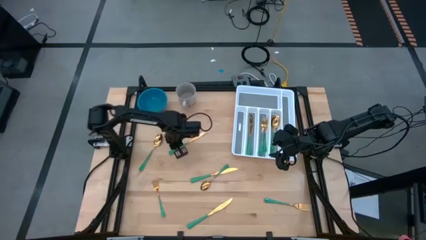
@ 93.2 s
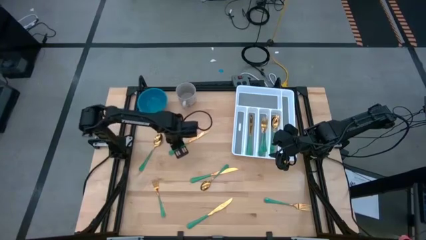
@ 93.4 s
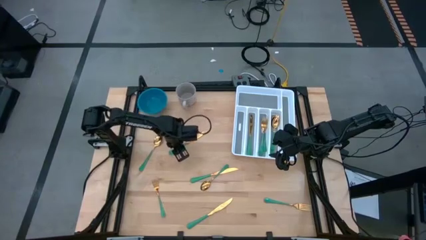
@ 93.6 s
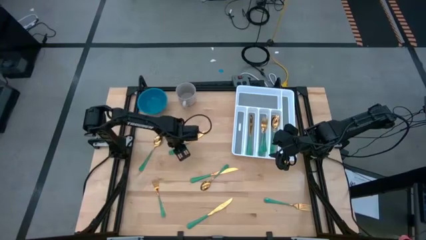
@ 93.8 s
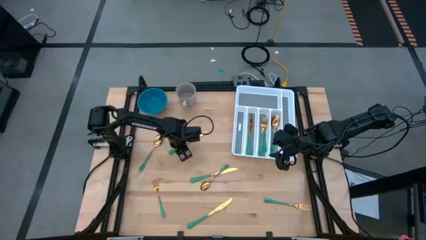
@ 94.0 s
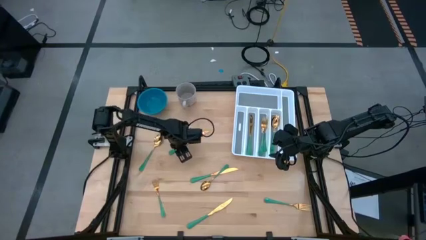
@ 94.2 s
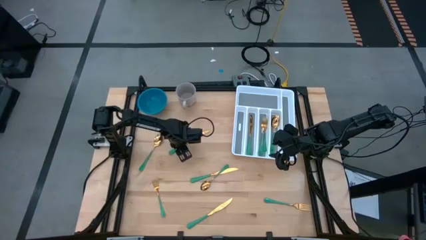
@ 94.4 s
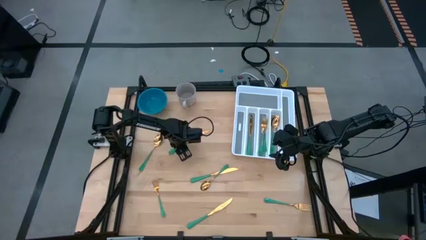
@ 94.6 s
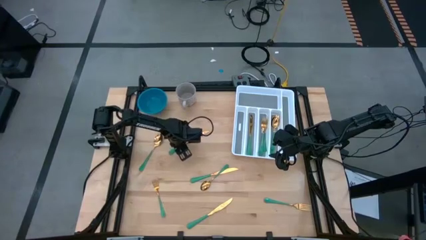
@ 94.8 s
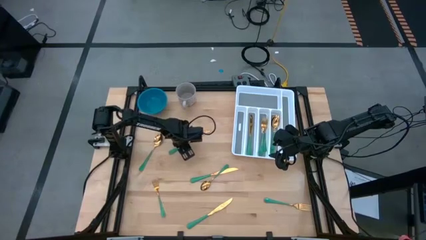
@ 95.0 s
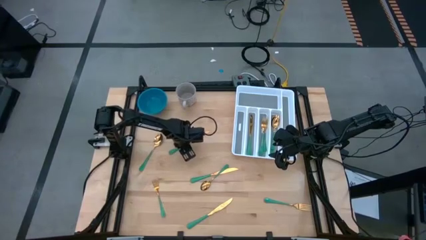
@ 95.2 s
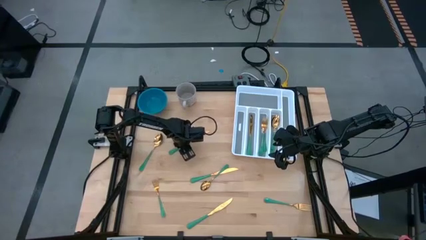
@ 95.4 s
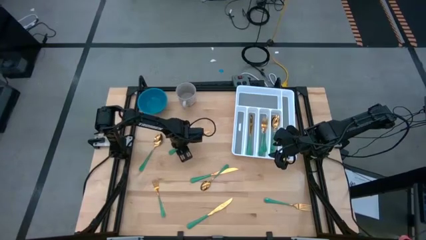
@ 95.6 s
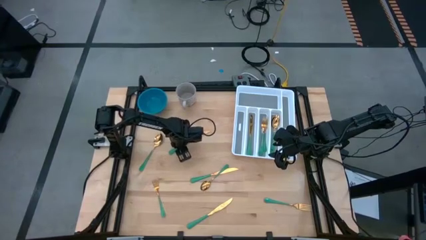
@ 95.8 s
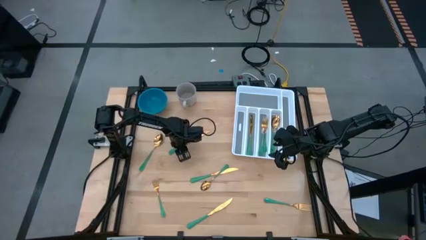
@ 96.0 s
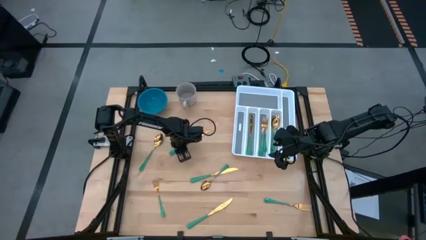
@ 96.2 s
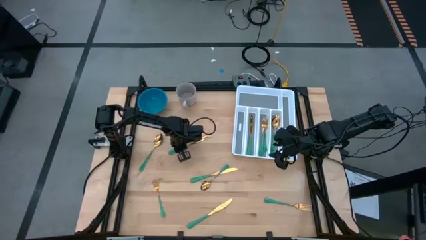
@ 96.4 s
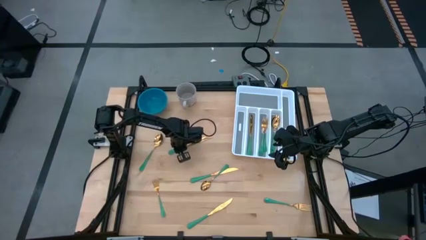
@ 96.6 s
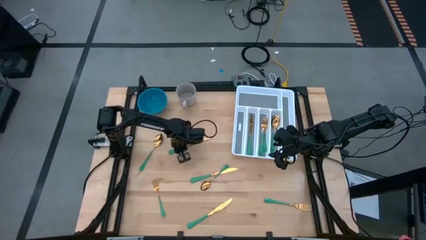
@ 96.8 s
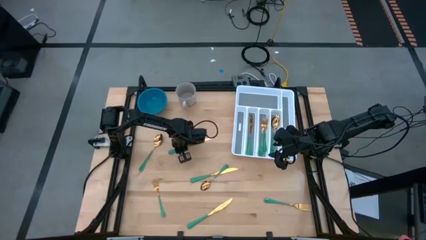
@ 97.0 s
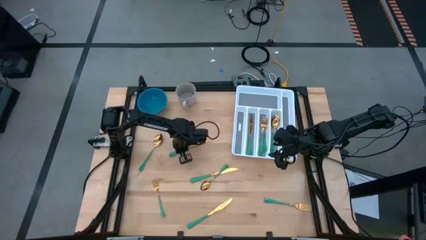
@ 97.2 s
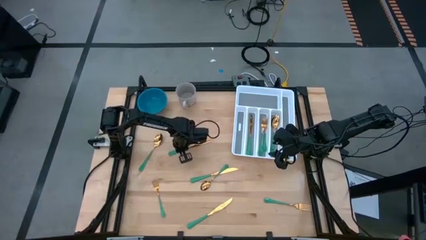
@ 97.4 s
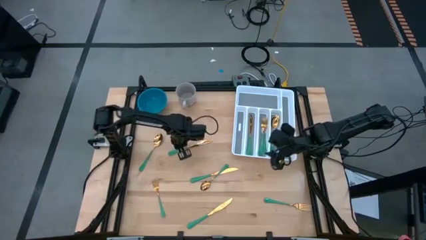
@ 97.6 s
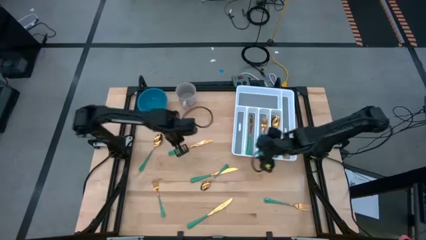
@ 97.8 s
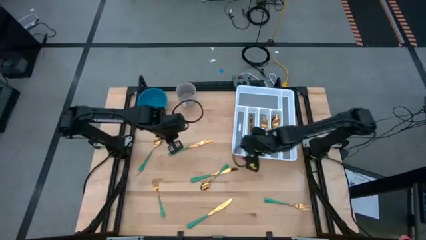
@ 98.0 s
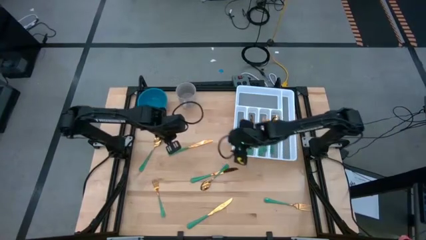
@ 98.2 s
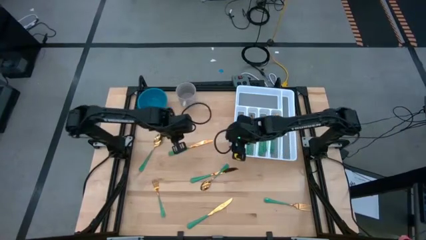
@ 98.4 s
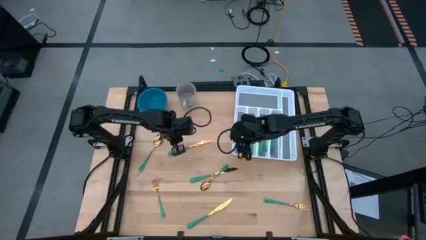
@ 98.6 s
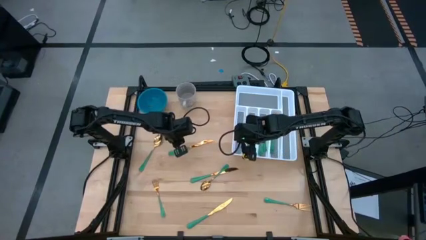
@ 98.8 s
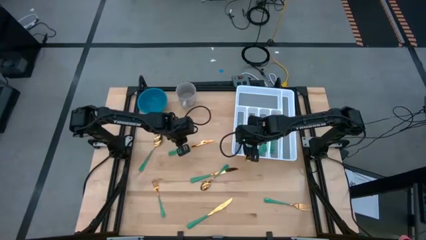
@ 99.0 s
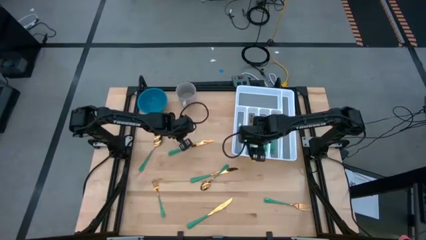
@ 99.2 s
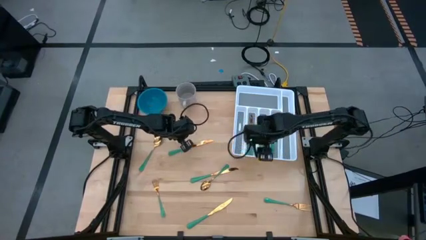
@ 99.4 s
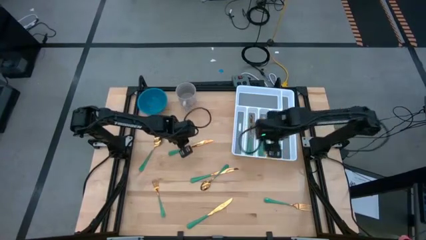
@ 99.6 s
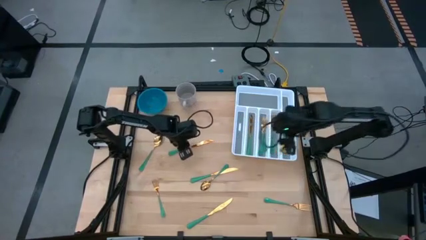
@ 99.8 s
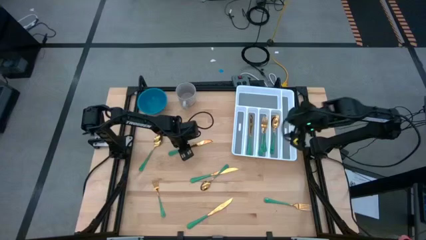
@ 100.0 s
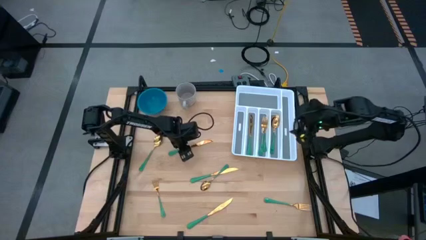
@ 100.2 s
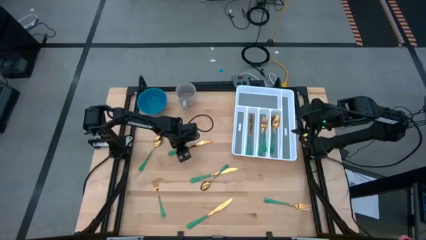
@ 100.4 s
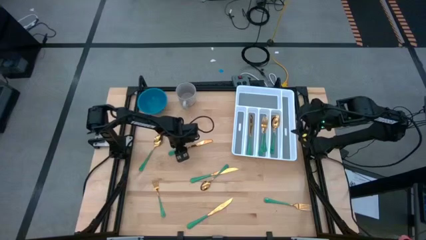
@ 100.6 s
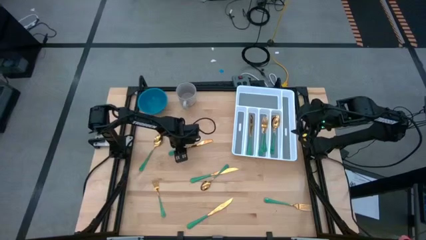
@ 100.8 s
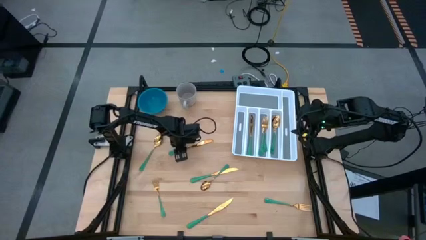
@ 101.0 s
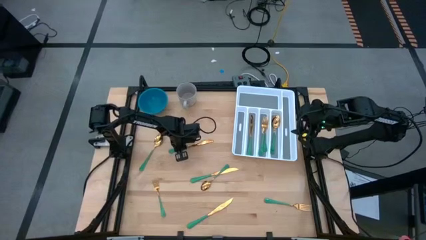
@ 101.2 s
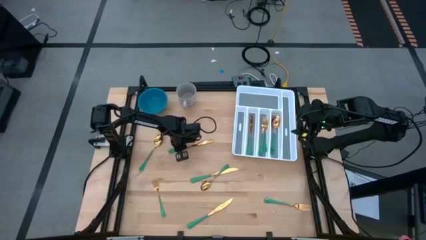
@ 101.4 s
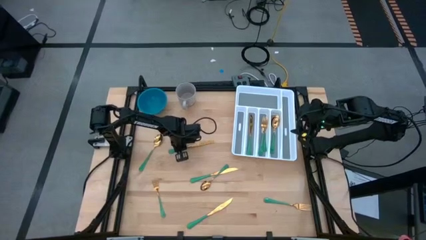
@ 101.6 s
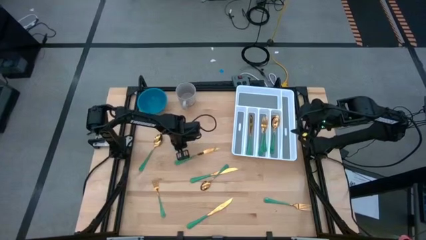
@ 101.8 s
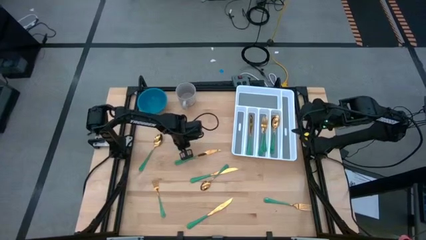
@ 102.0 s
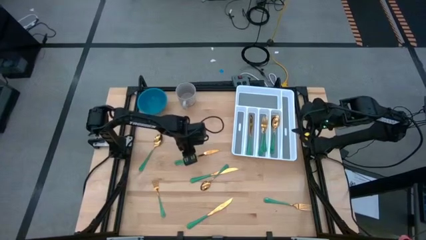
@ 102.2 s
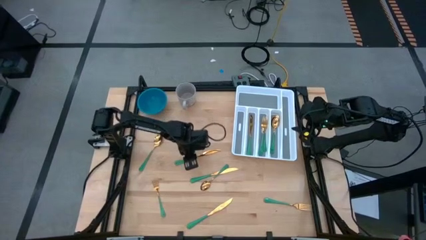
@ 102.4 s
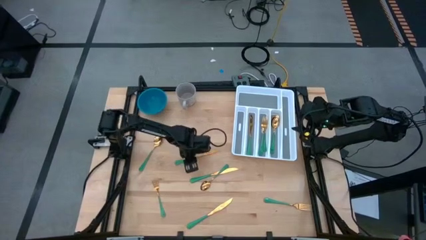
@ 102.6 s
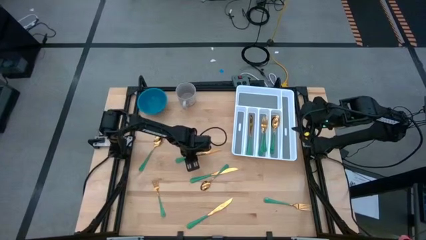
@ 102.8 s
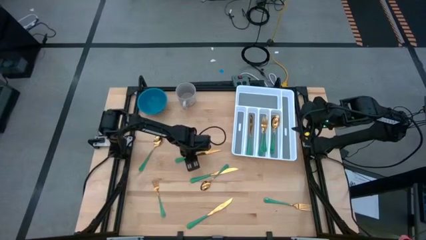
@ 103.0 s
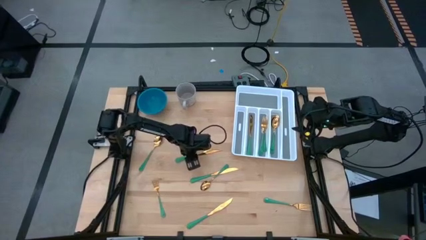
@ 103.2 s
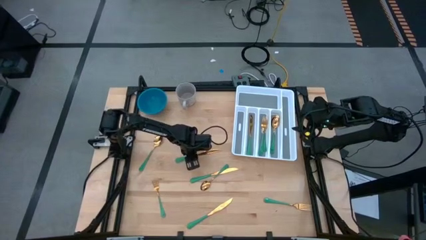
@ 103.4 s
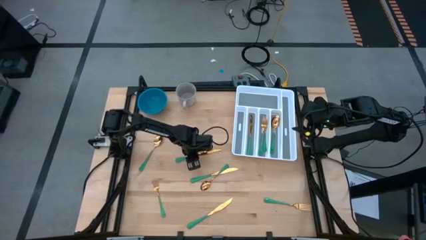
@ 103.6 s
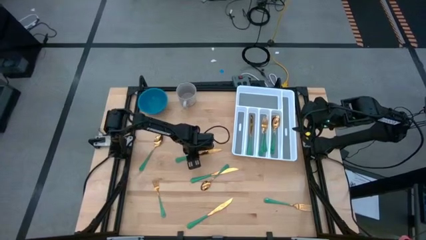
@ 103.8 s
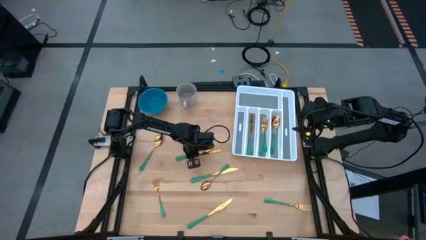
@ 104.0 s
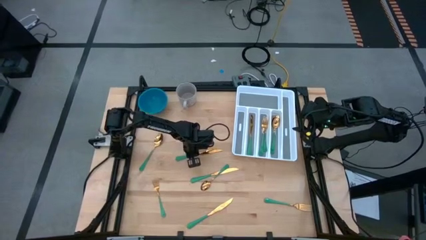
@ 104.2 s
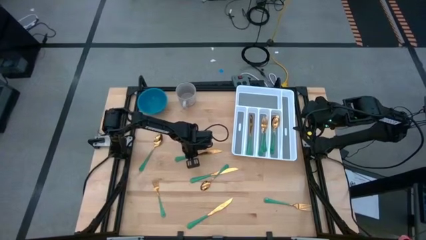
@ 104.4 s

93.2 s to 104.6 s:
Task: Sort silverware
Put the green table knife into the white cutlery tray
